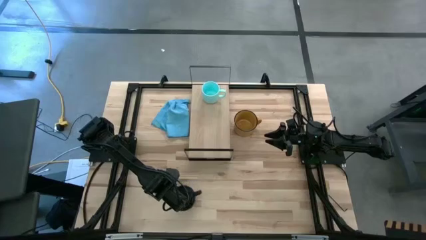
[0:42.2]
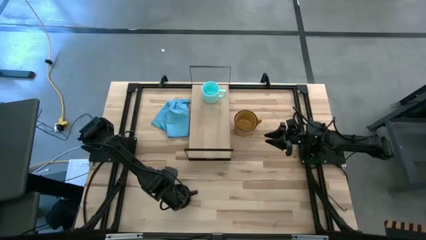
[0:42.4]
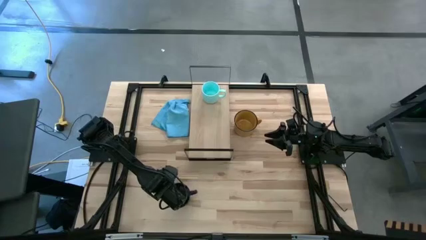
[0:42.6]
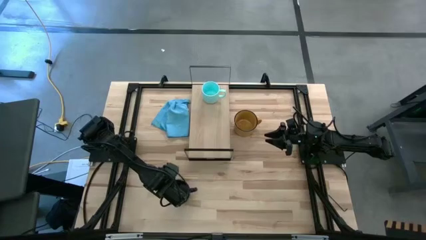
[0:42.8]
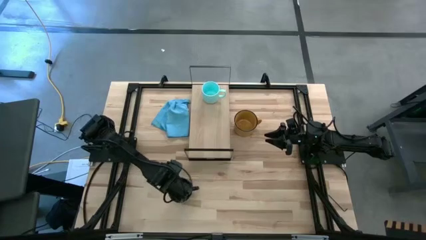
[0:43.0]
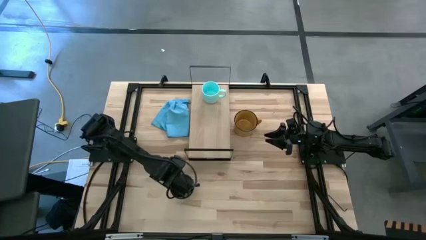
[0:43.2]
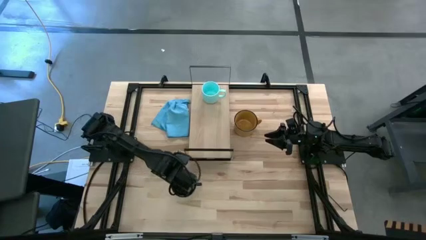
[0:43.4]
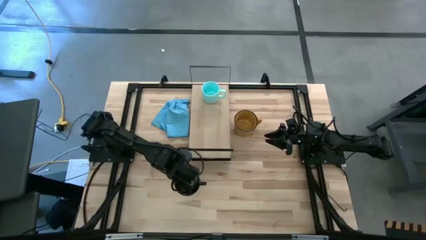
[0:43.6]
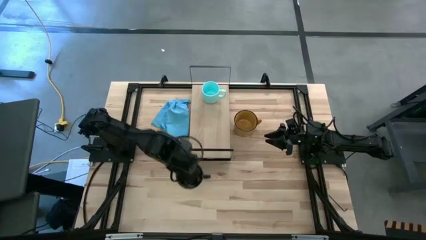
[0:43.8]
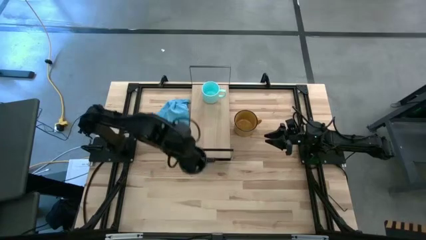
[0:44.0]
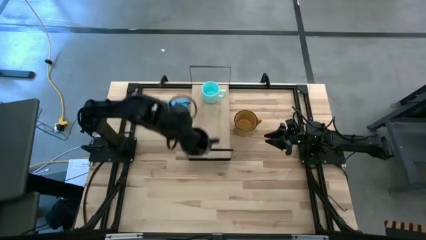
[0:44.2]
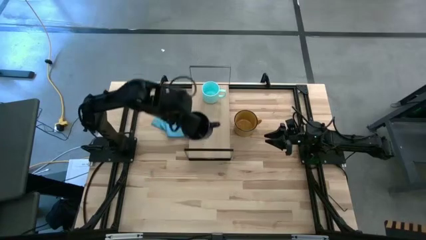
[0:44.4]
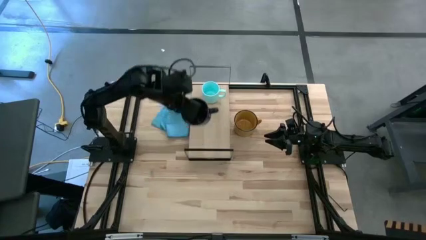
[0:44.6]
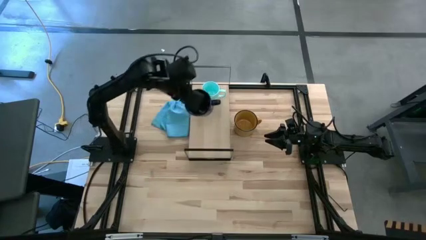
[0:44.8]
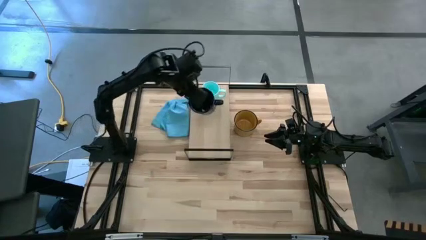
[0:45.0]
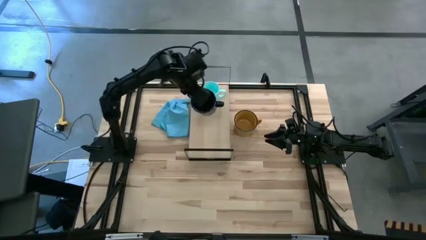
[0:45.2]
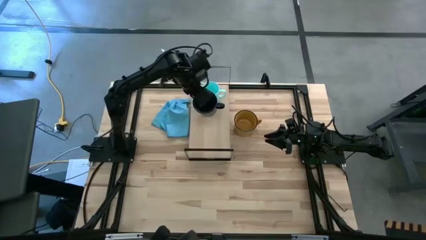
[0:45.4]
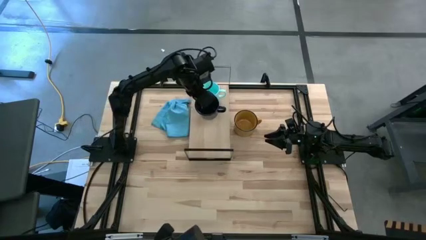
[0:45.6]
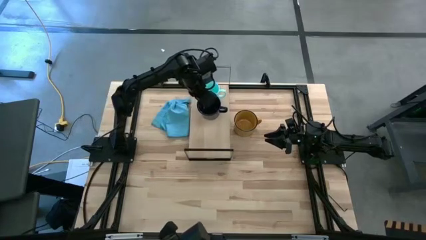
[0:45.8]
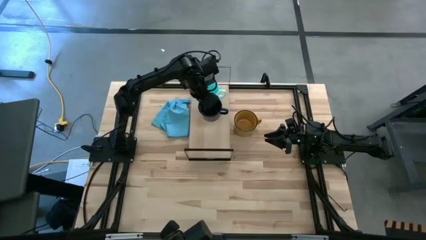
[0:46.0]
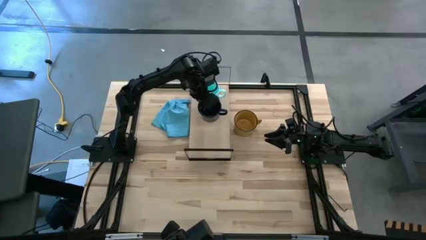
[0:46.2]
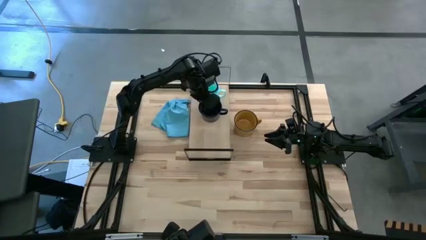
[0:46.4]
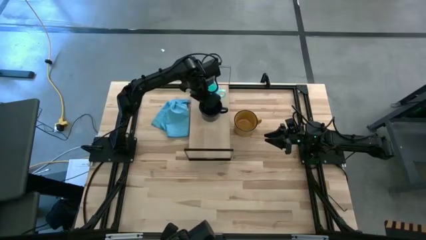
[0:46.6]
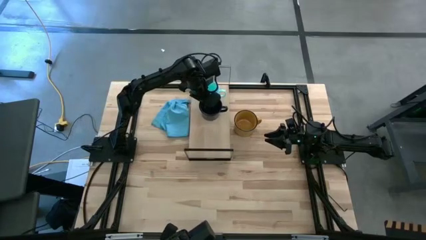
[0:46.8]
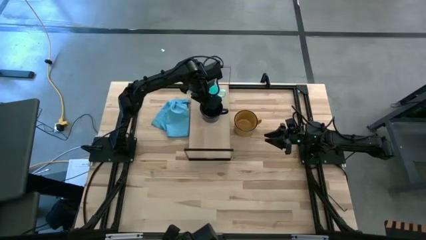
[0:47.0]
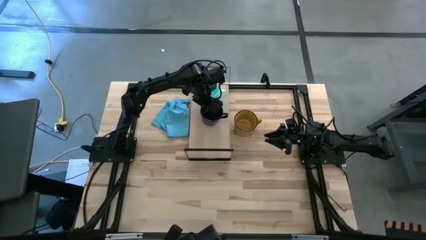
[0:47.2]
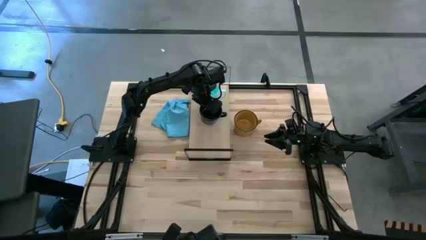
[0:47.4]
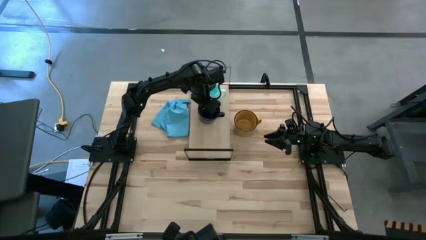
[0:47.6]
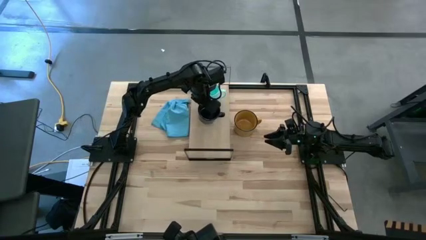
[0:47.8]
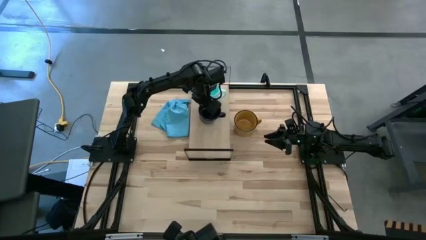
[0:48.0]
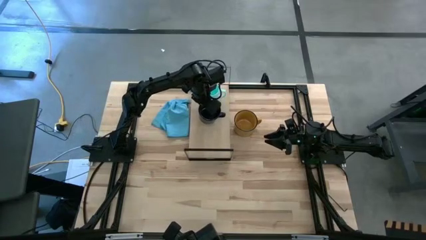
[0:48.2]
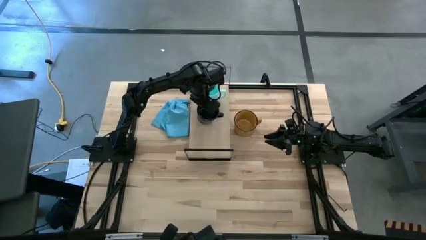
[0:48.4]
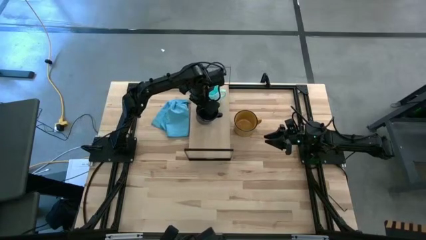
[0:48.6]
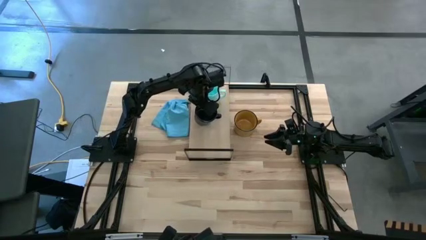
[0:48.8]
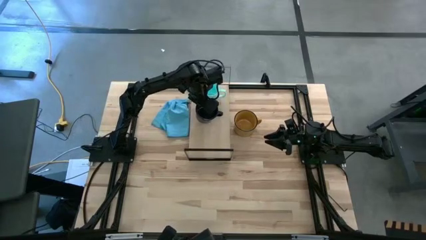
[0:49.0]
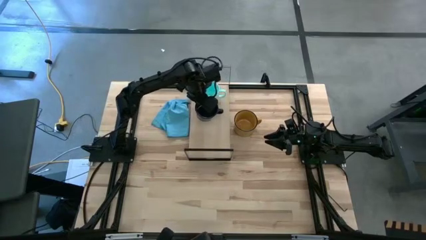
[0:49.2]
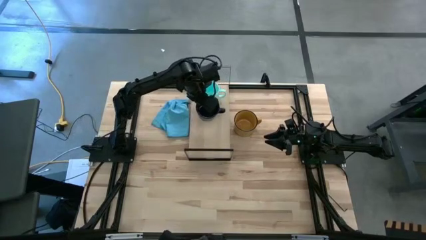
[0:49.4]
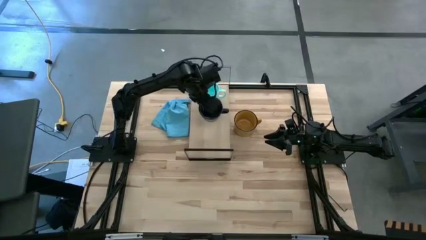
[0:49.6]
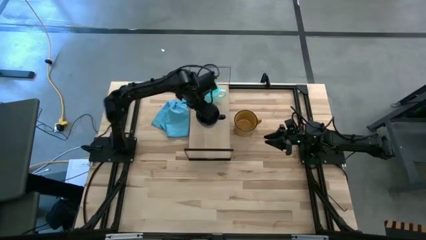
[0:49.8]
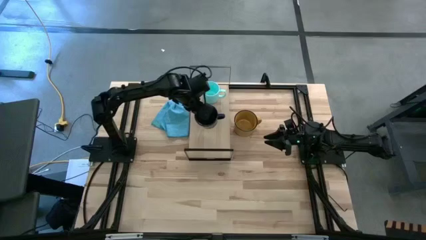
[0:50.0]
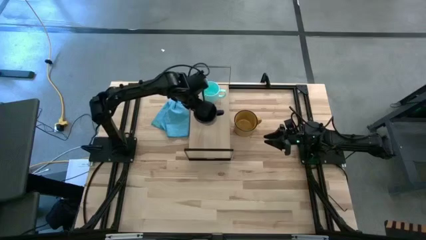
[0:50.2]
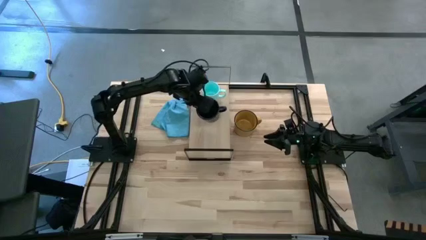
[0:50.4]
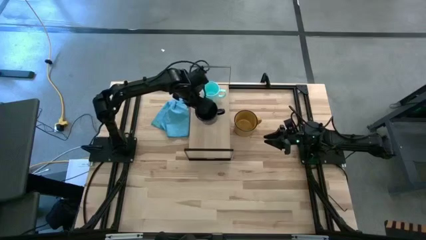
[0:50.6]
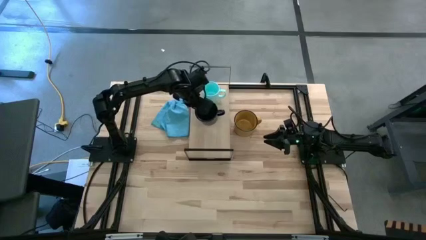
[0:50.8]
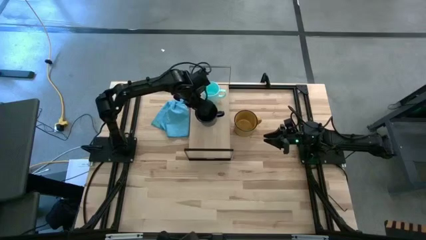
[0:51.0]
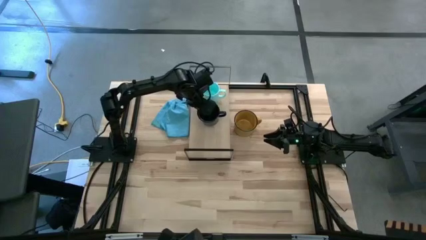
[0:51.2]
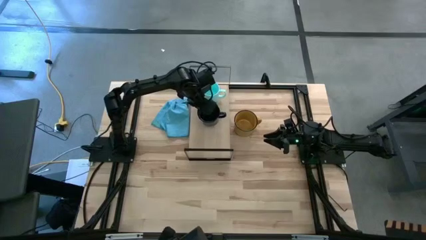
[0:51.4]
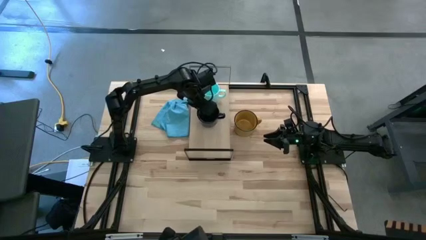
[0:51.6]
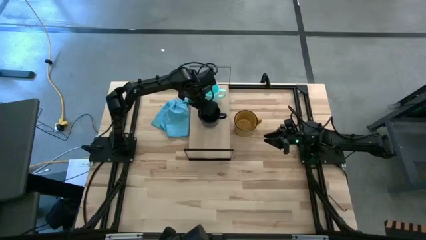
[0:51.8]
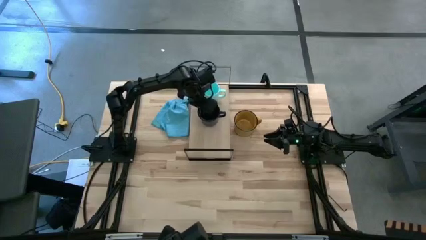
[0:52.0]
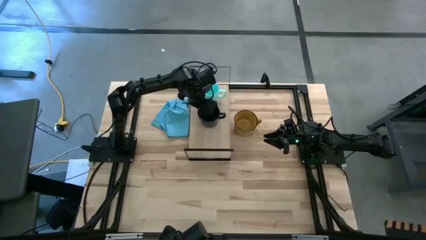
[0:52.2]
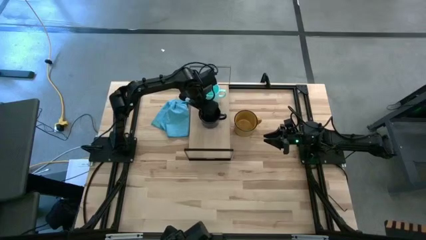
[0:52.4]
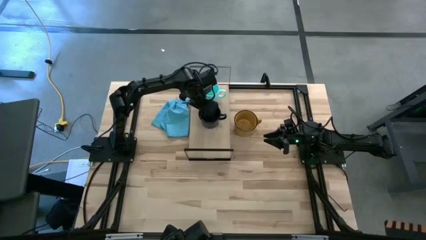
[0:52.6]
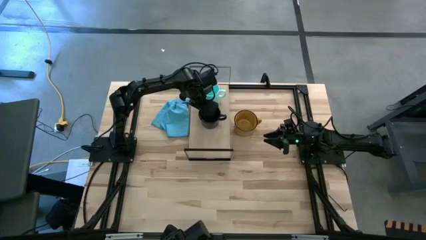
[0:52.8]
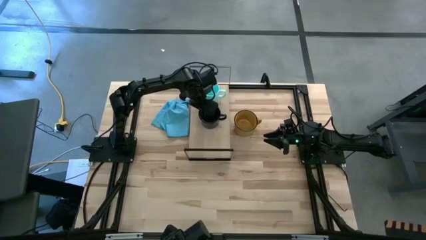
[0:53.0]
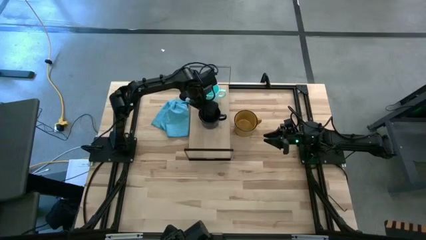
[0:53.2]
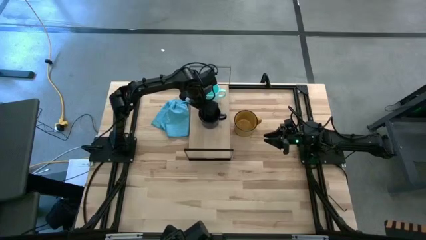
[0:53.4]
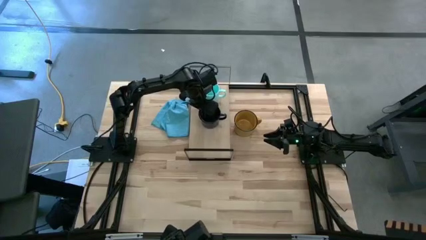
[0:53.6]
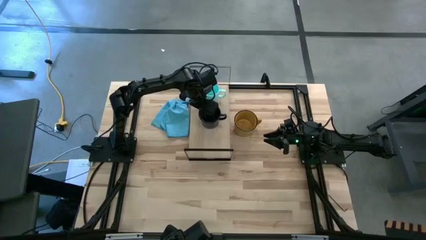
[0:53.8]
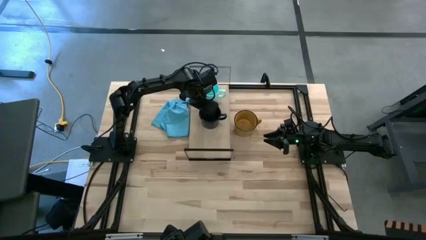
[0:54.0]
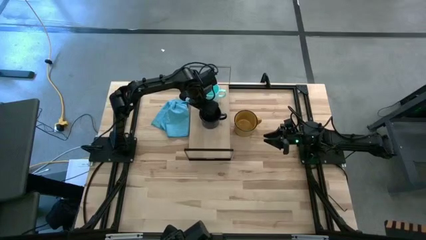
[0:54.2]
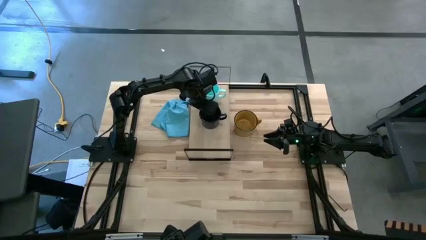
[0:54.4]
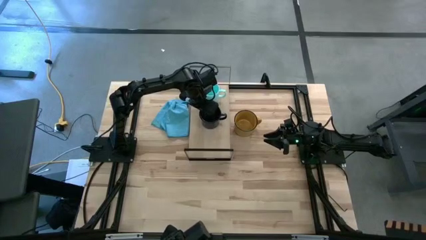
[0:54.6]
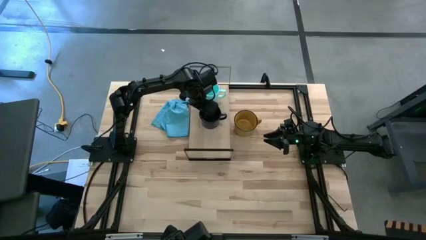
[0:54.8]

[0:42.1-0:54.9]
Task: Stack small to large cups/mugs on shelf
Put the dark blue mug on the shelf

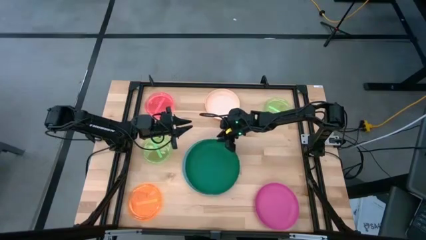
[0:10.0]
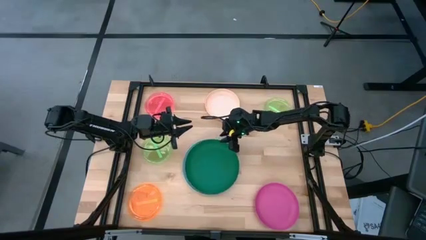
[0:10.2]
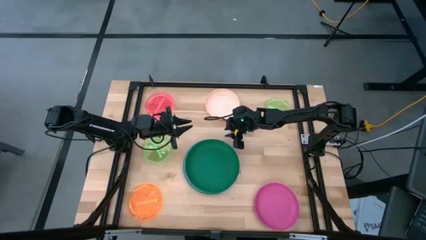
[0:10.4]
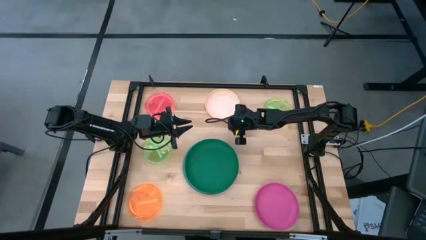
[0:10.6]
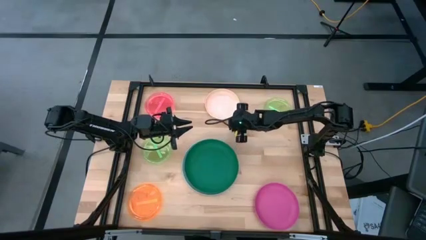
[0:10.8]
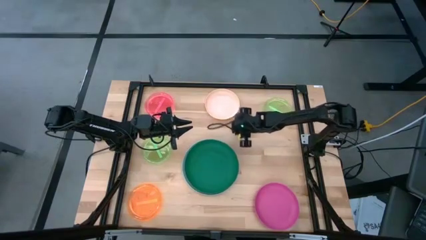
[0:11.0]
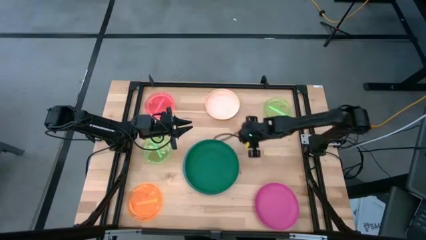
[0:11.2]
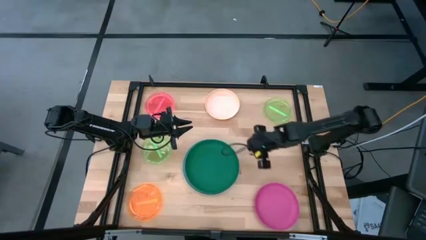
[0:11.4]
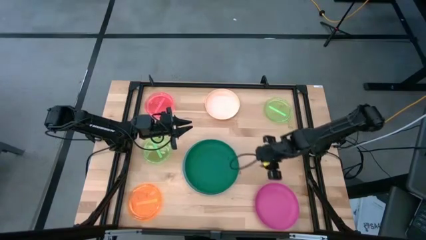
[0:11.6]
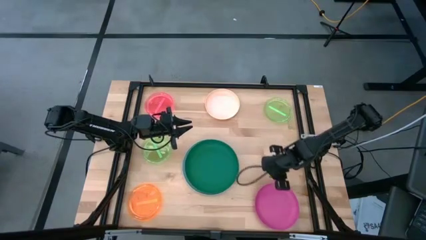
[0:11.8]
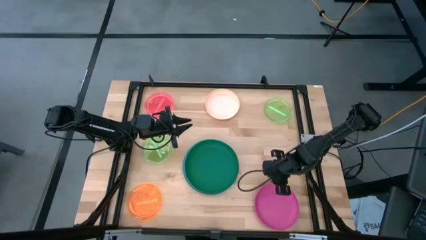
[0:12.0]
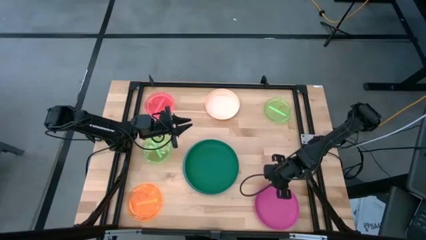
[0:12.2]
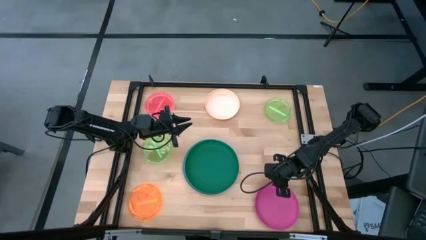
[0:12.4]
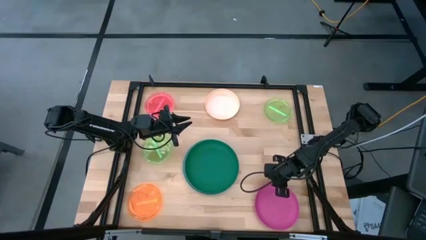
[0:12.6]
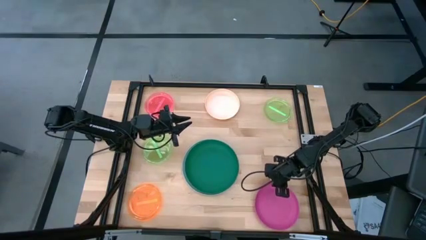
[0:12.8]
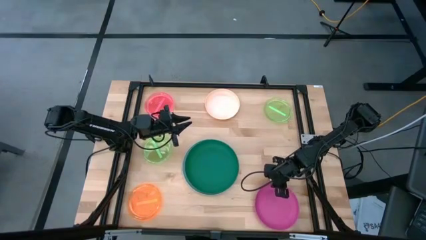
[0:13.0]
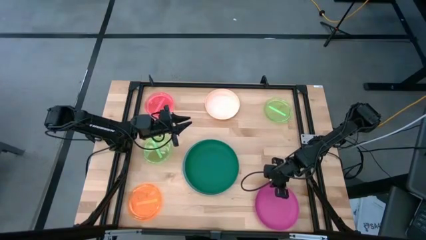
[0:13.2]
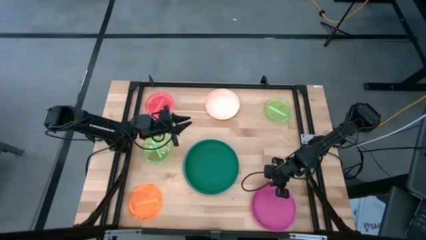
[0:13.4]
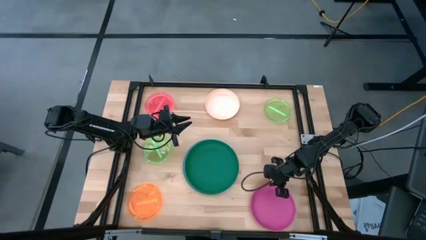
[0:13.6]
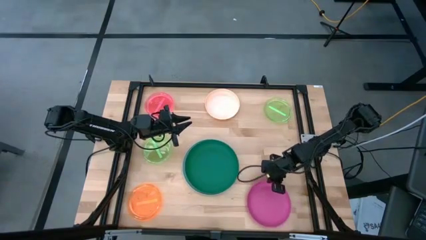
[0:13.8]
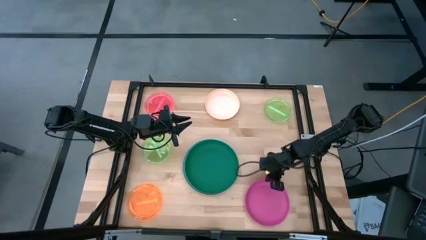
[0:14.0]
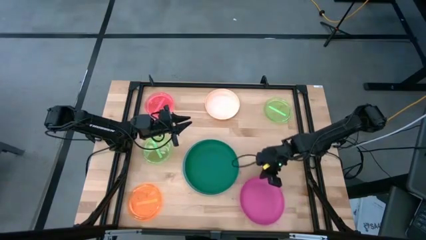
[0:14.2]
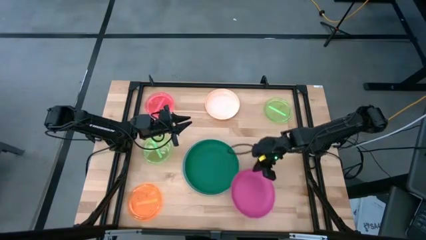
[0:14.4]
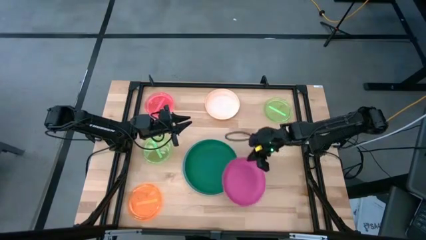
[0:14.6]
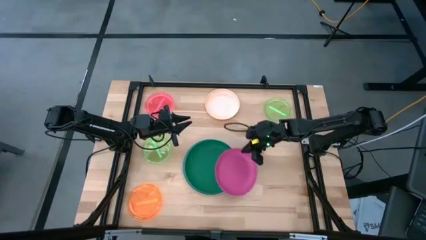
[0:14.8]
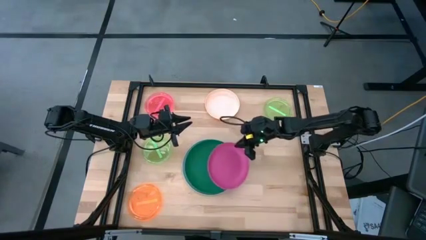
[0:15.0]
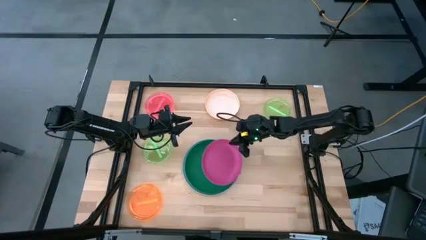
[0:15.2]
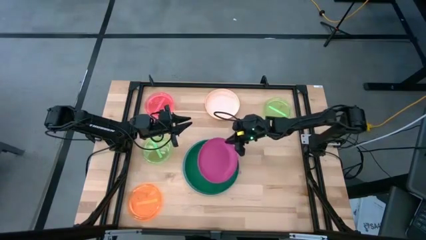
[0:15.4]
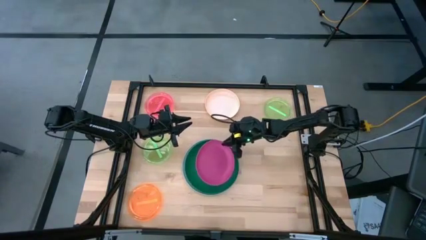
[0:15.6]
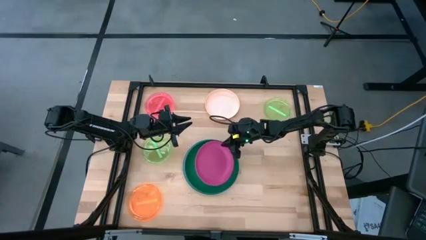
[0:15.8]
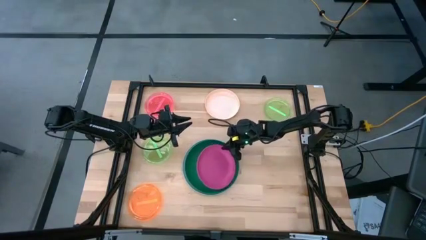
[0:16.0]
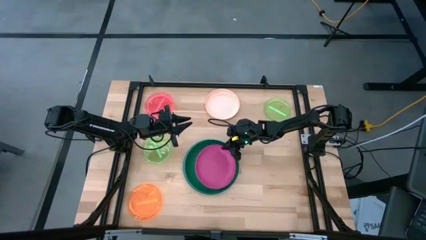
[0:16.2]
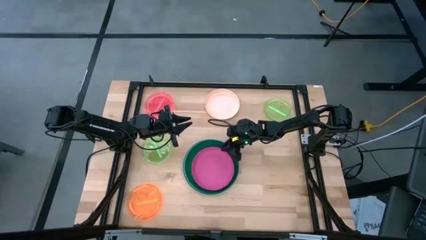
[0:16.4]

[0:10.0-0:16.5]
Task: Stack plastic plates
Stack the pink plate on top of the green plate
